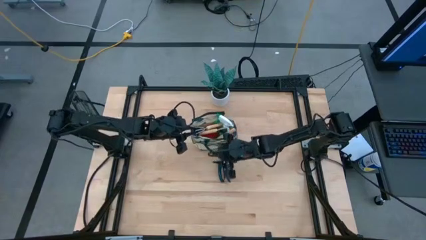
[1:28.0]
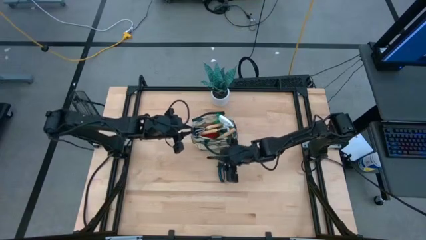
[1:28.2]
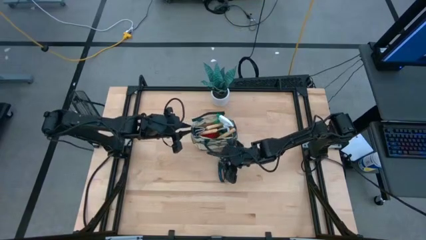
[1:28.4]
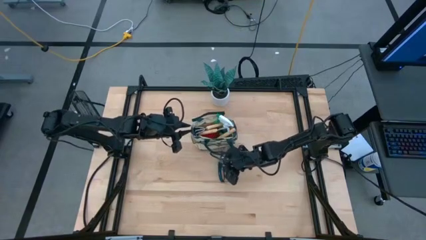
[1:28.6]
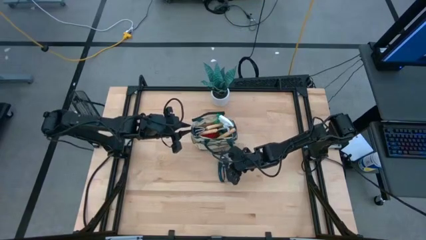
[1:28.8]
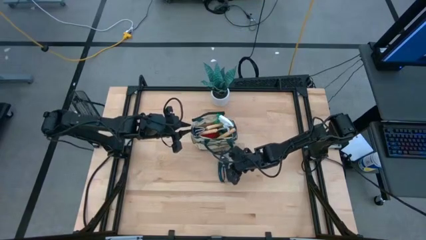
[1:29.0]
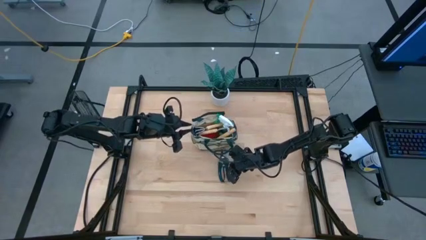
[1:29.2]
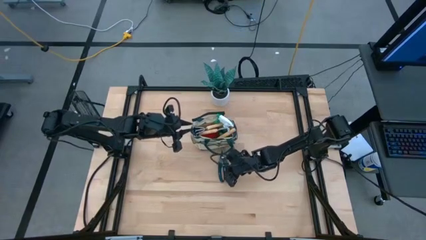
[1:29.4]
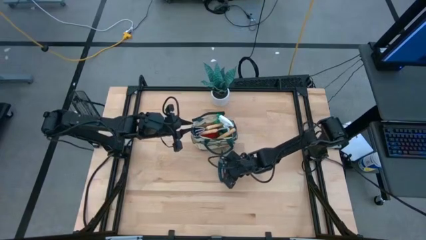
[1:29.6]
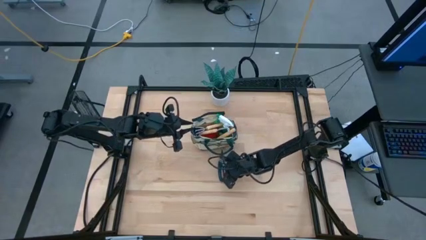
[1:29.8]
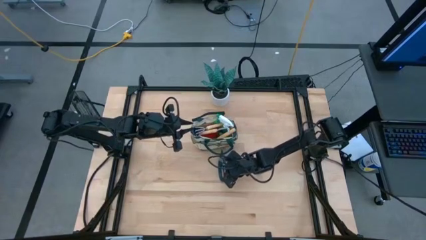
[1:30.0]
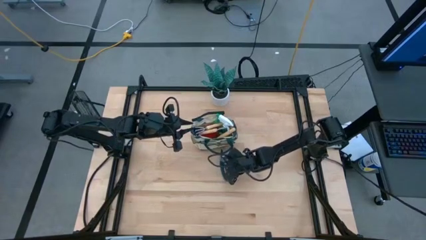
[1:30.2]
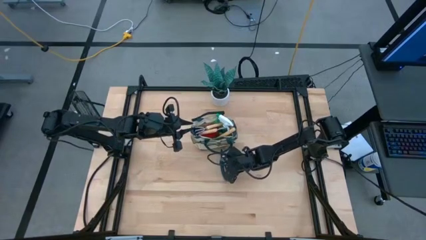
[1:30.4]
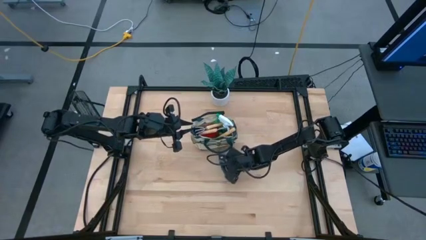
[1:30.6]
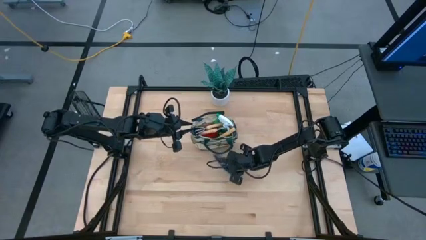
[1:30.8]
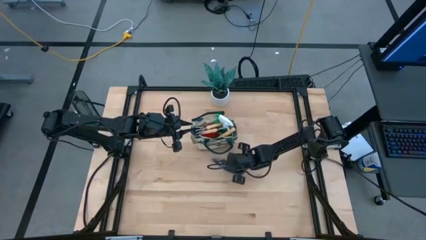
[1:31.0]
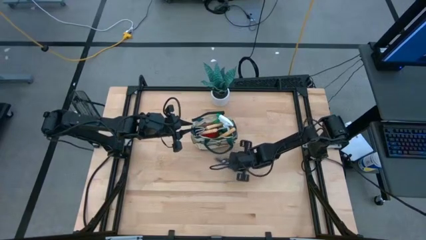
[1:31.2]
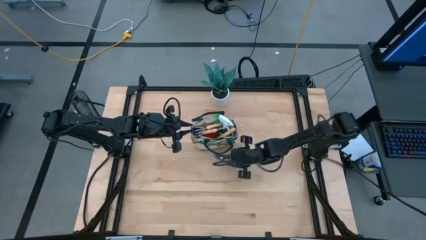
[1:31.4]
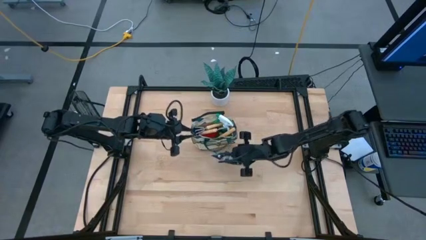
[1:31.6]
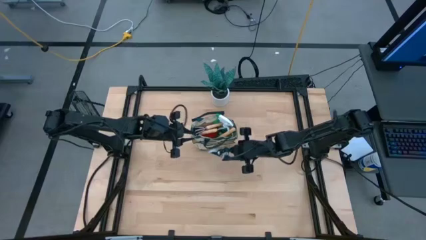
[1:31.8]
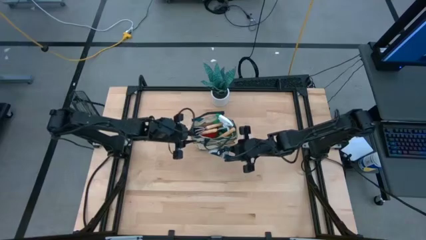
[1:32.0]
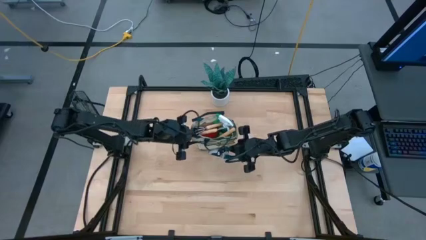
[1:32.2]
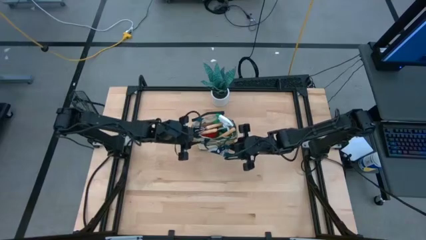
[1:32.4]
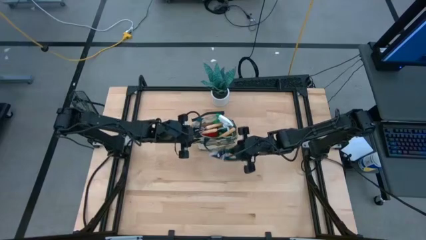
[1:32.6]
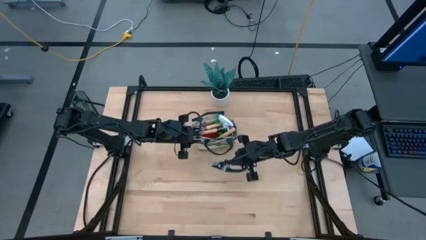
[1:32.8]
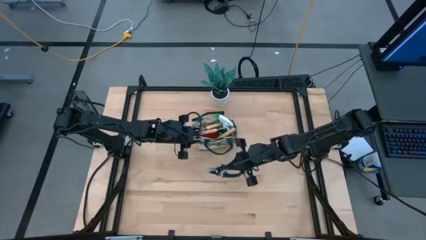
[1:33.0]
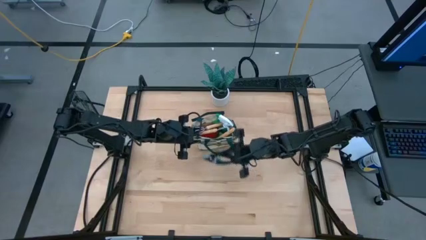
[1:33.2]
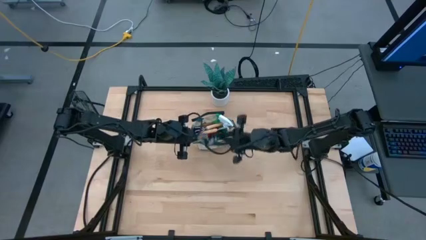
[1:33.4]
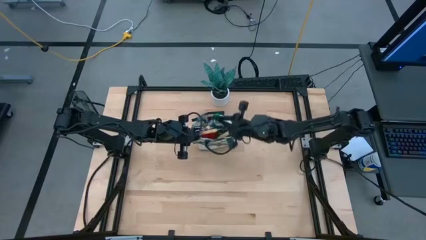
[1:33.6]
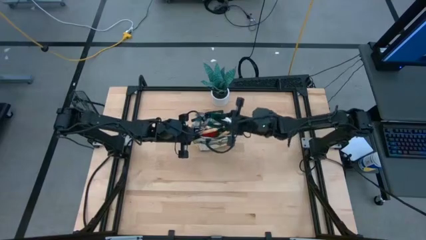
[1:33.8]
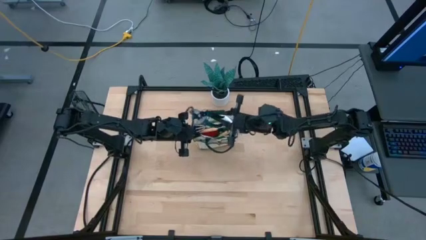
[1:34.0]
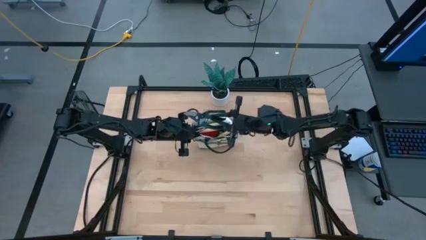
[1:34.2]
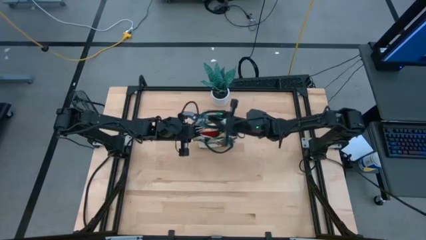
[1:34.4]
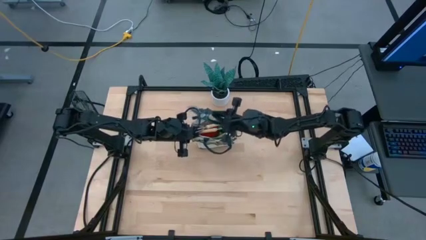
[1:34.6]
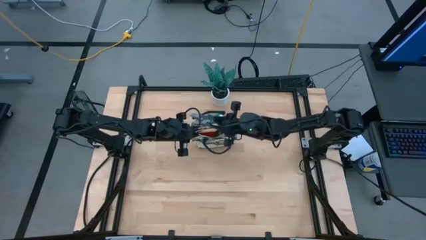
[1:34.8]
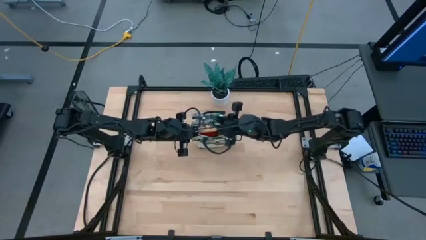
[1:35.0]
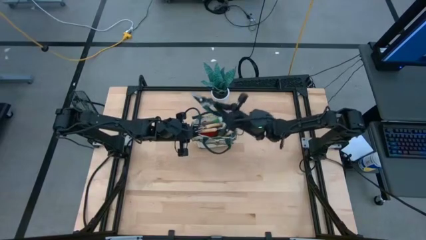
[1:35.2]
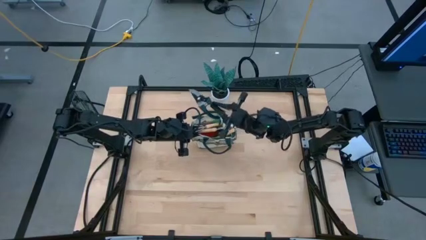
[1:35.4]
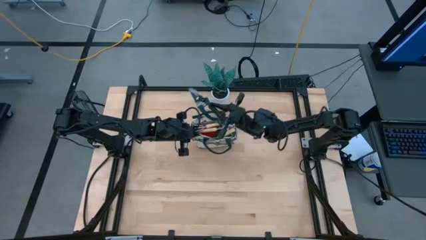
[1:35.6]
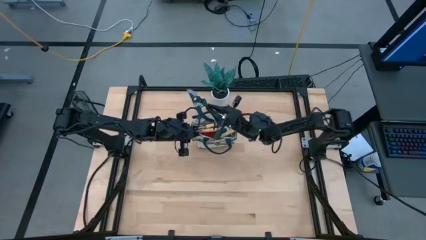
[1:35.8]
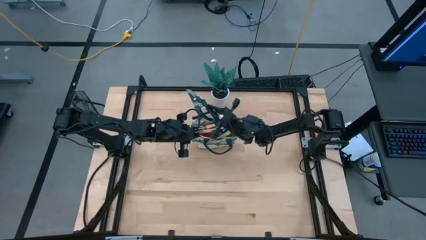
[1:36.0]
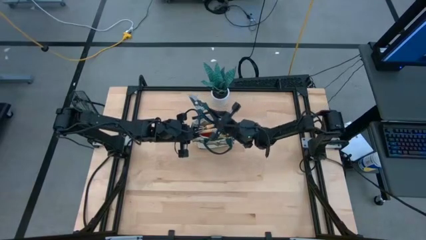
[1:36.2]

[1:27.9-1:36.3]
Task: Pick & Place Garden tools in Gardening bag
Put the green shear scissors into the brown gardening bag
